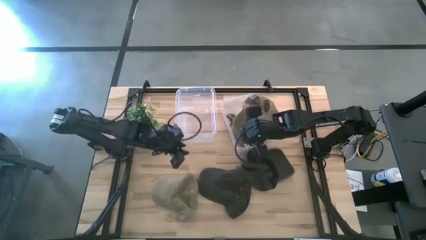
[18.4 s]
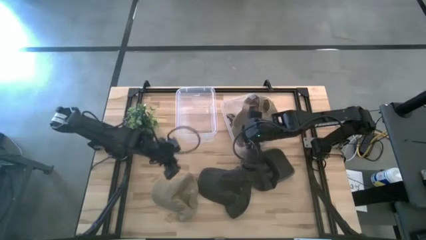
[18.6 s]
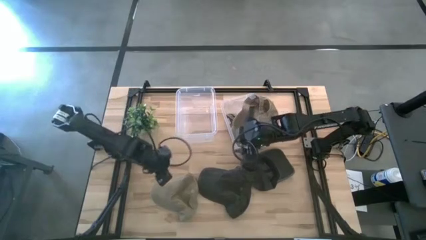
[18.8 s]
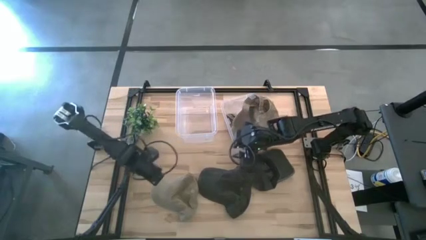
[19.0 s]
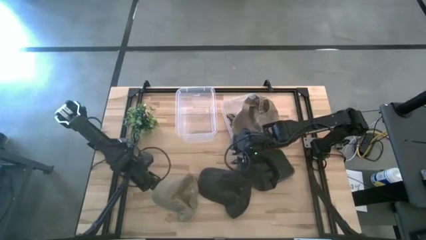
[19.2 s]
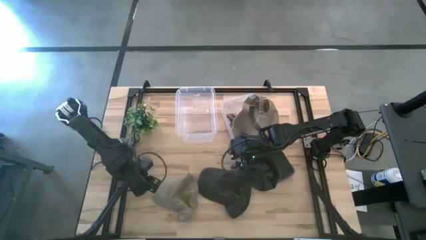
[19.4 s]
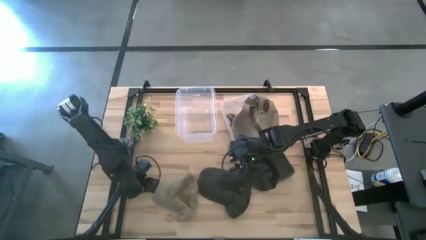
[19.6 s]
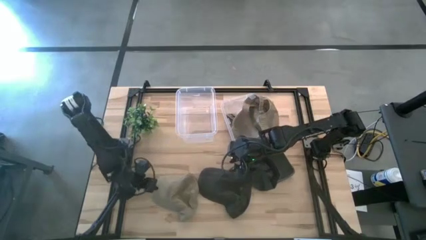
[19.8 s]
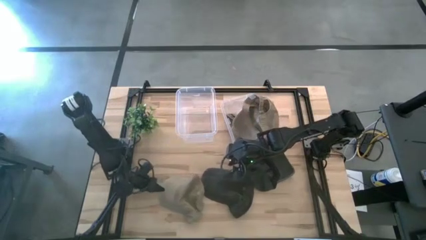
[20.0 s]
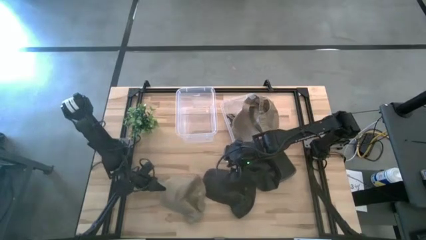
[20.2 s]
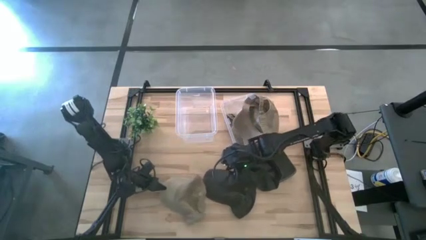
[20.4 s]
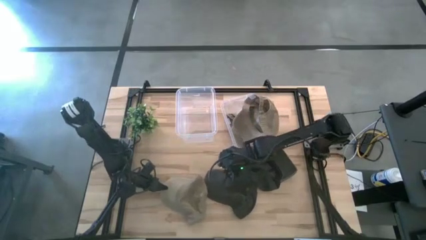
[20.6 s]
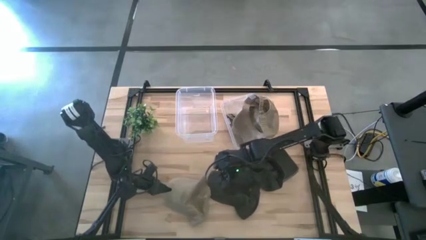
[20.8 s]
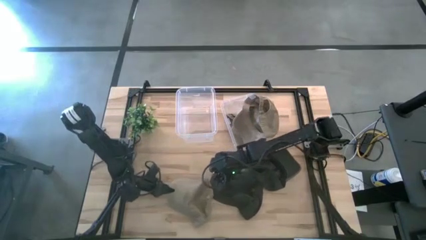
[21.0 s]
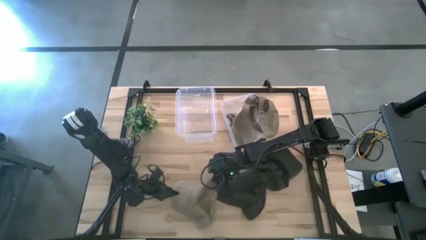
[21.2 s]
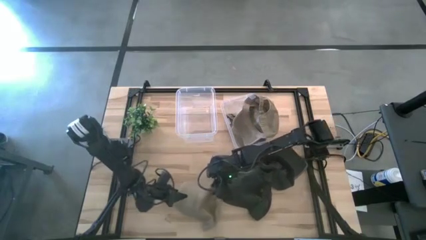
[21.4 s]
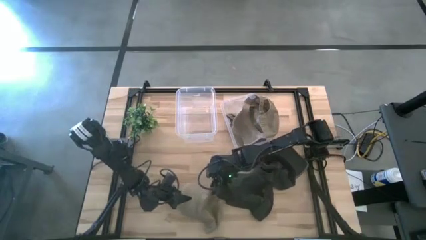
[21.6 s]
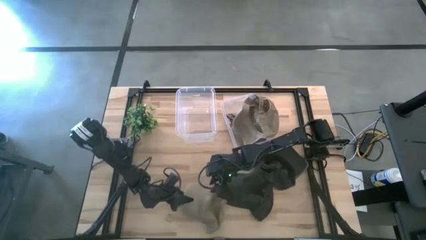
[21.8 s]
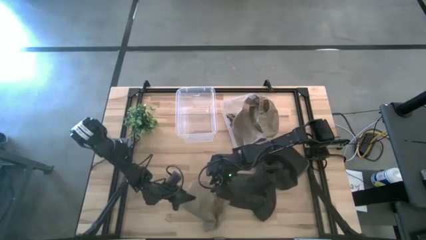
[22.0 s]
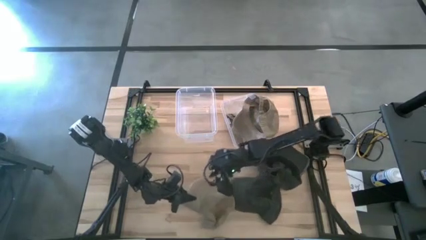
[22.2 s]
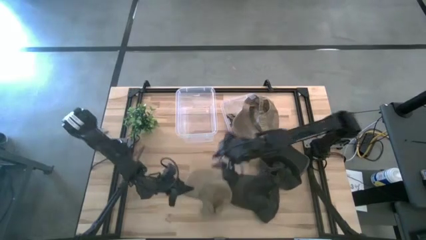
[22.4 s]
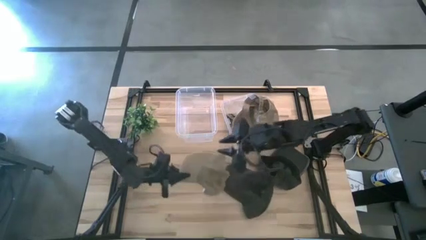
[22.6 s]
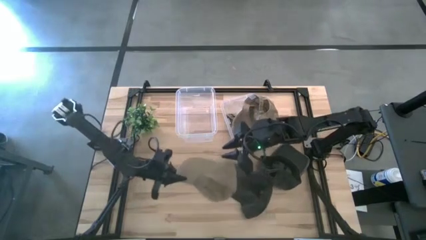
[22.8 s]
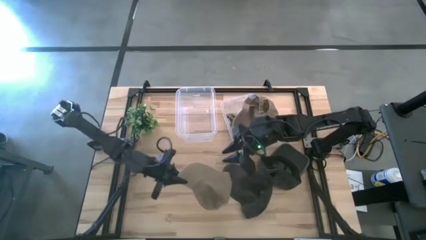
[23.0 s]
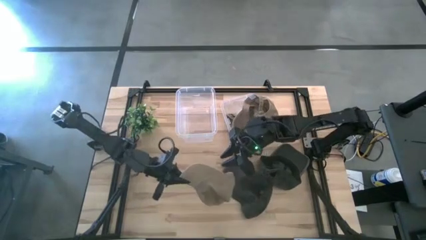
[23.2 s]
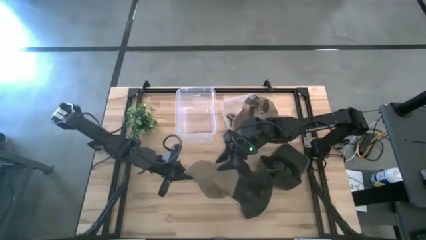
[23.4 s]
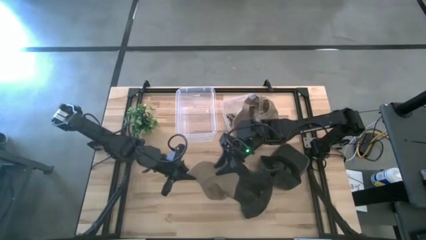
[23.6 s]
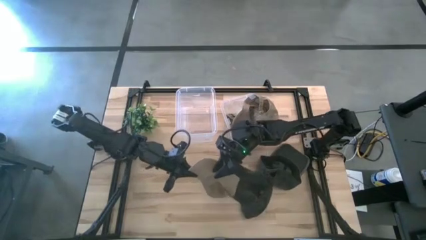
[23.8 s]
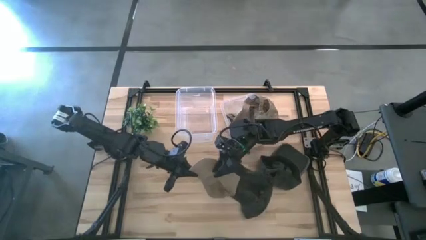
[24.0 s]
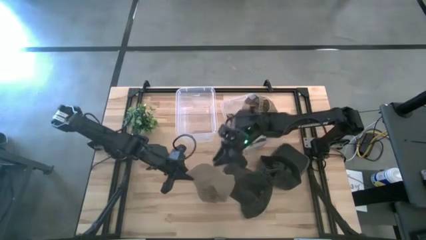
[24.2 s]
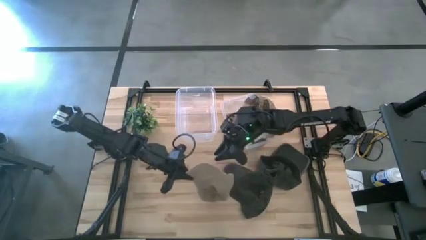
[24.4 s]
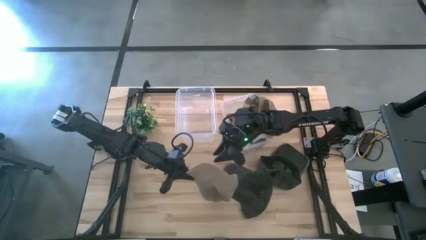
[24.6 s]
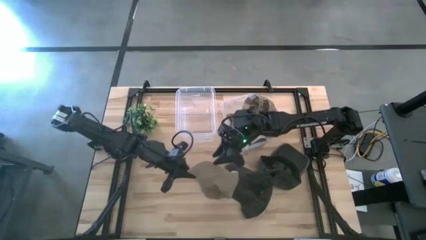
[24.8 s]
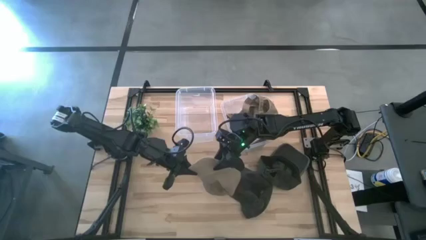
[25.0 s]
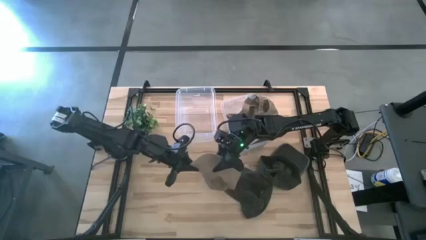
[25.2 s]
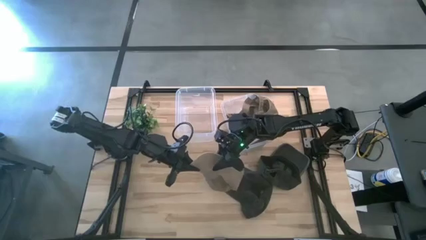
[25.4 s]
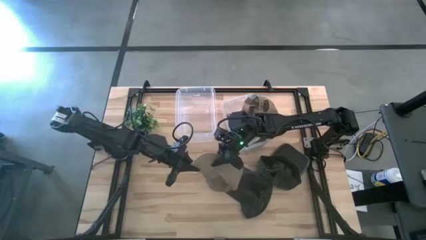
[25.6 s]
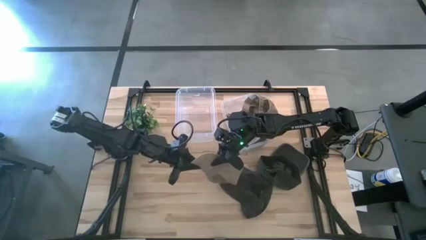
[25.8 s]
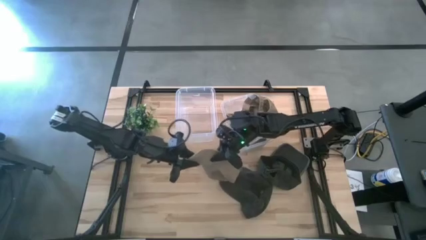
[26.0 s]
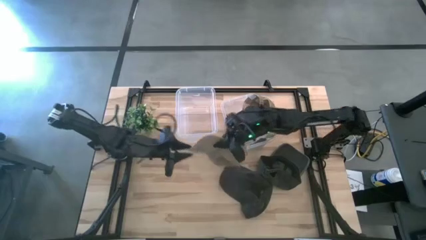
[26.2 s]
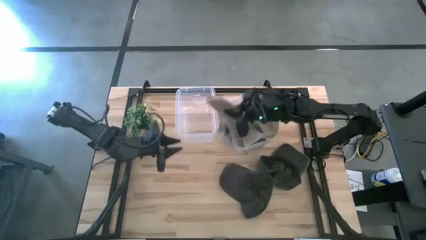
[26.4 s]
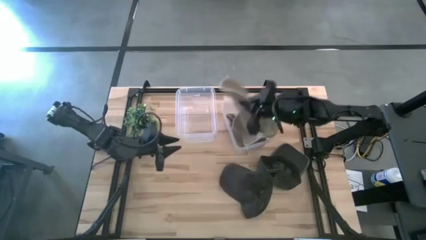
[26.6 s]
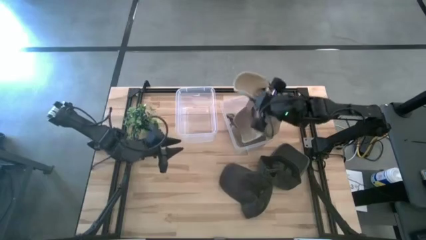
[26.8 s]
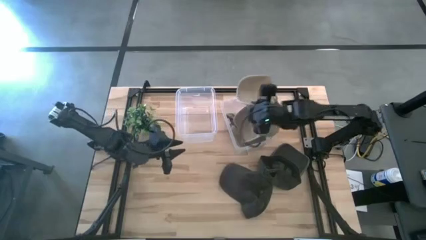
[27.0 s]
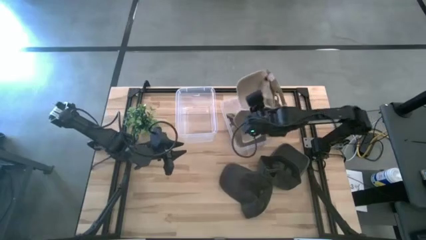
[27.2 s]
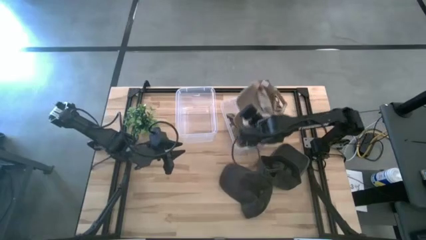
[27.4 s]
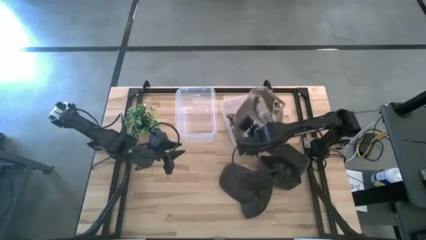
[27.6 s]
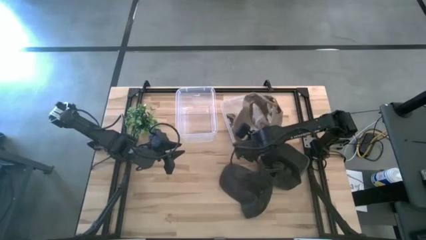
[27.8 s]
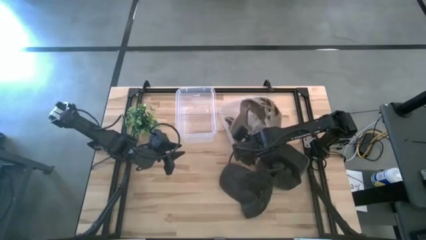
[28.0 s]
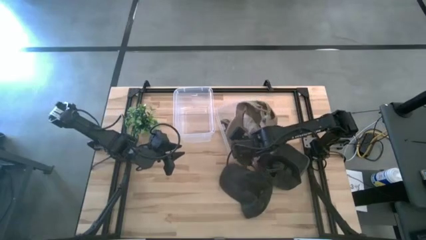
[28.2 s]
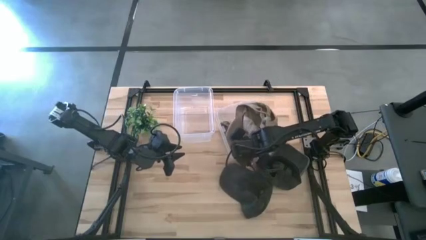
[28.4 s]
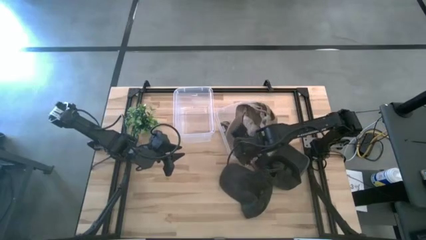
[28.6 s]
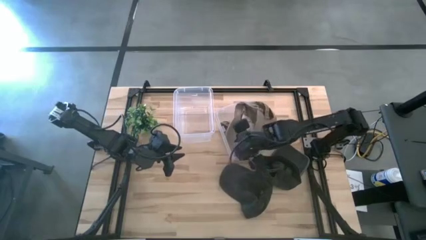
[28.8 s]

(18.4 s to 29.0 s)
Task: Pick & Place hat
Put the brown cap into the right transparent bin

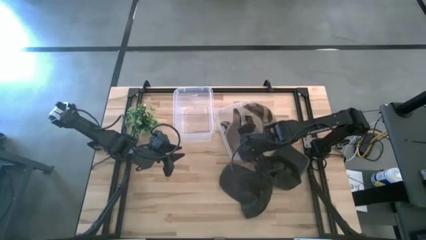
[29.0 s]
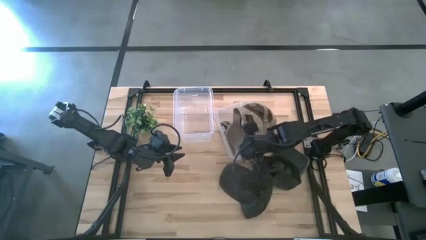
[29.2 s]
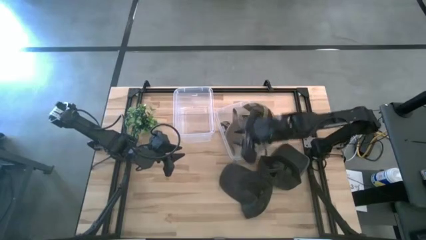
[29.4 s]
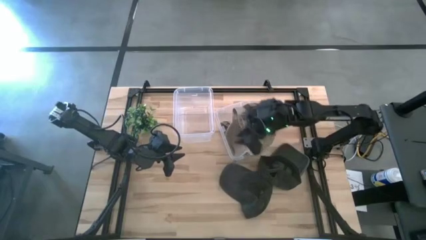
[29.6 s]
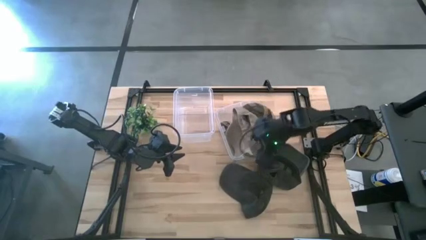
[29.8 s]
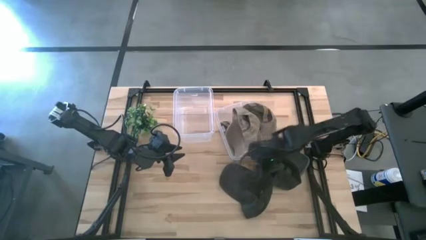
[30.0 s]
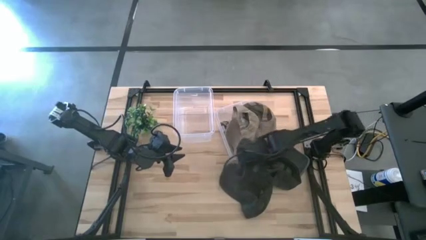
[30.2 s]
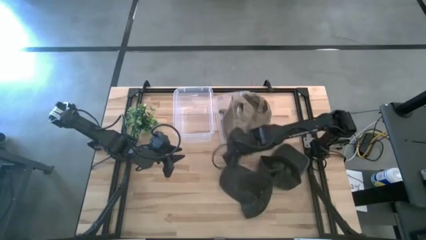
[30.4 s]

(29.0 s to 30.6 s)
Adjust the right transparent bin

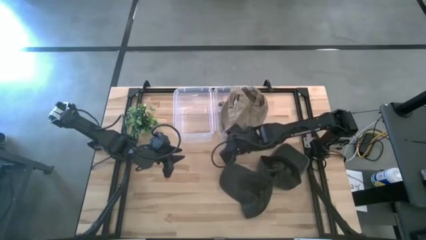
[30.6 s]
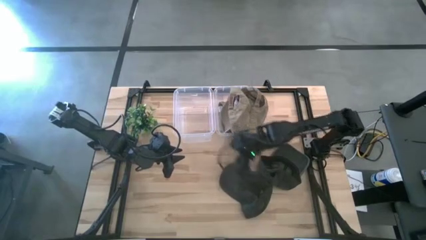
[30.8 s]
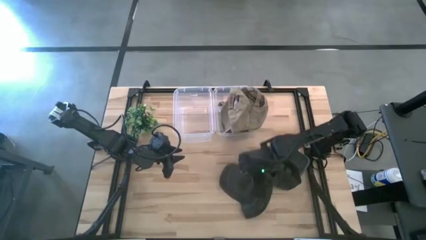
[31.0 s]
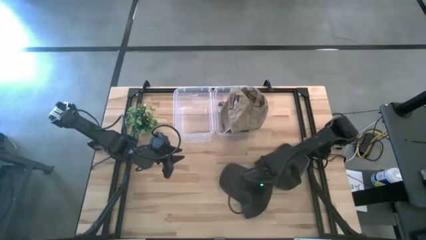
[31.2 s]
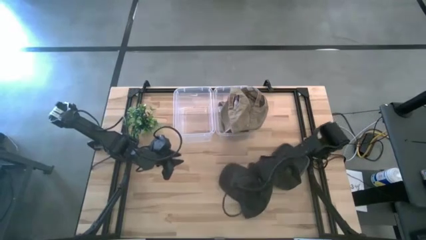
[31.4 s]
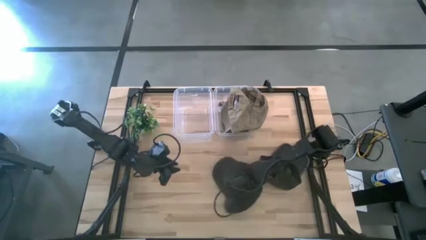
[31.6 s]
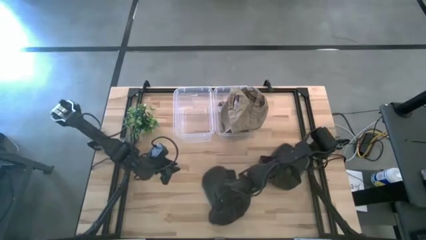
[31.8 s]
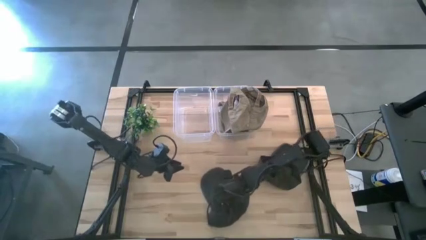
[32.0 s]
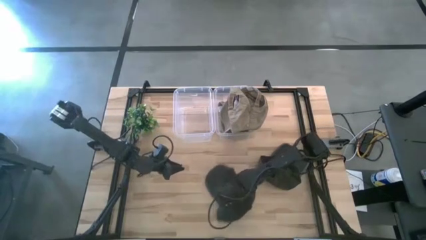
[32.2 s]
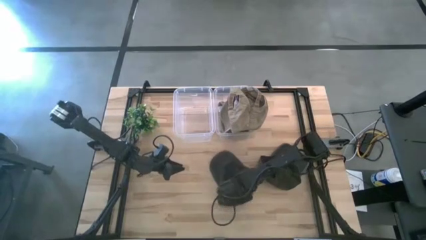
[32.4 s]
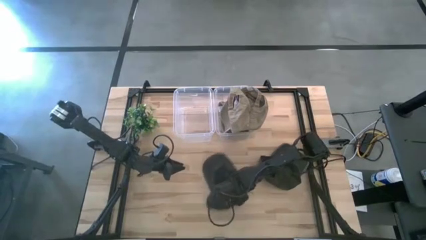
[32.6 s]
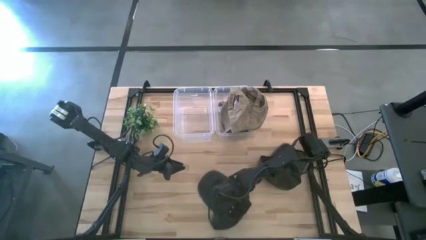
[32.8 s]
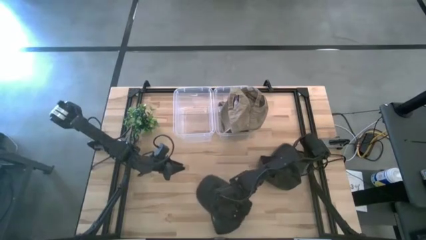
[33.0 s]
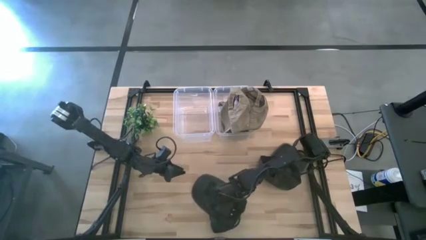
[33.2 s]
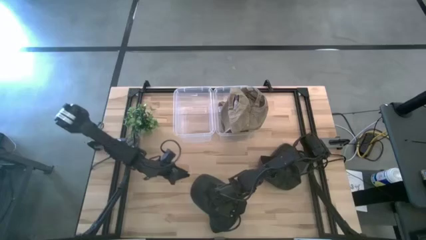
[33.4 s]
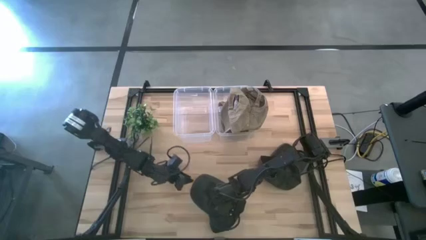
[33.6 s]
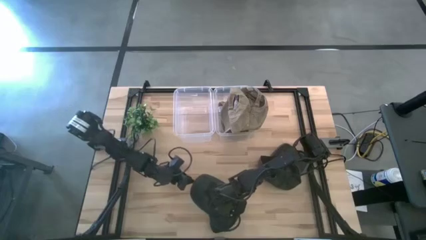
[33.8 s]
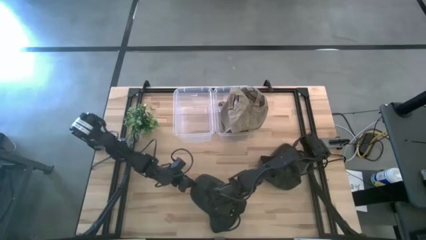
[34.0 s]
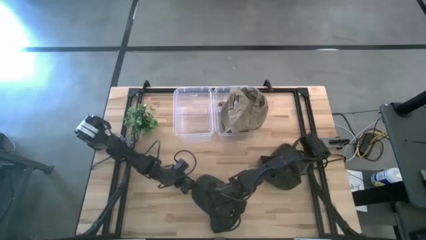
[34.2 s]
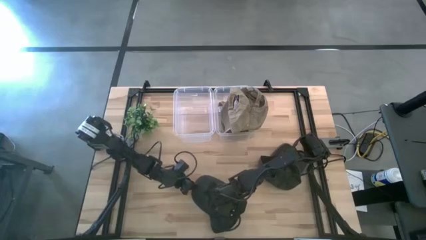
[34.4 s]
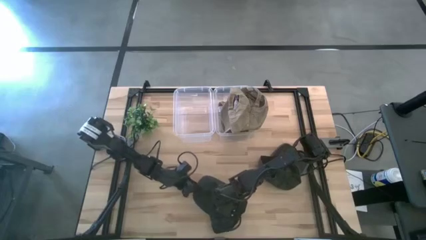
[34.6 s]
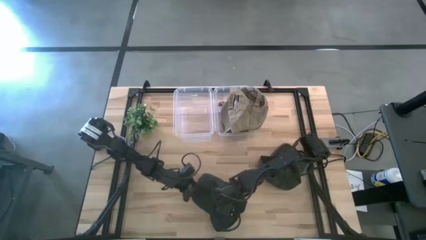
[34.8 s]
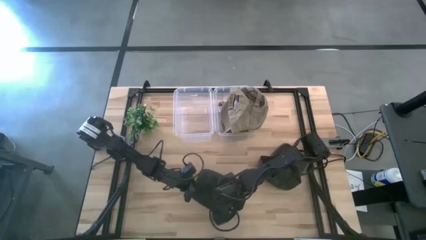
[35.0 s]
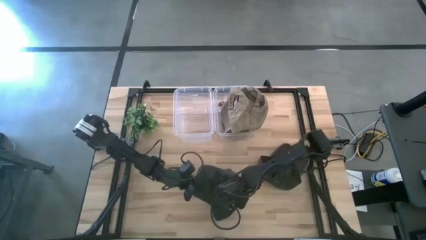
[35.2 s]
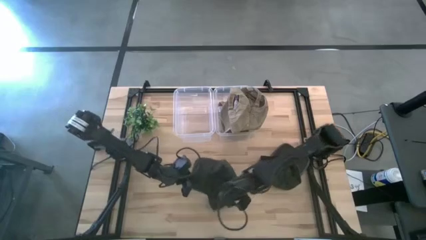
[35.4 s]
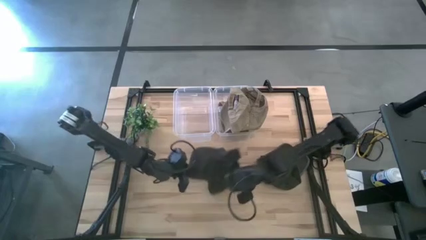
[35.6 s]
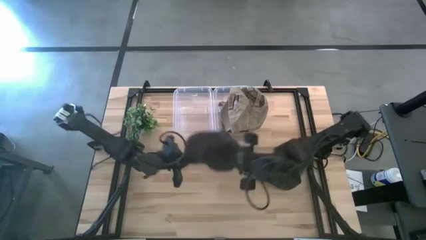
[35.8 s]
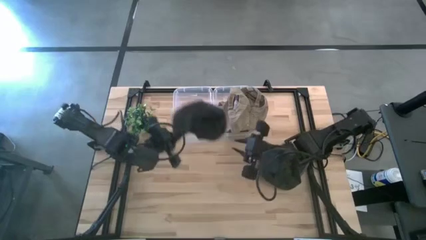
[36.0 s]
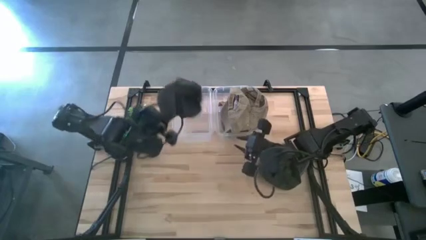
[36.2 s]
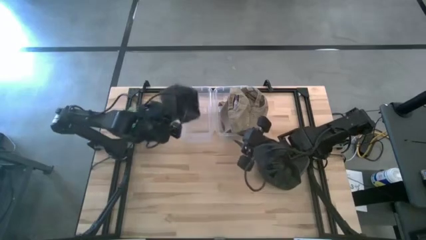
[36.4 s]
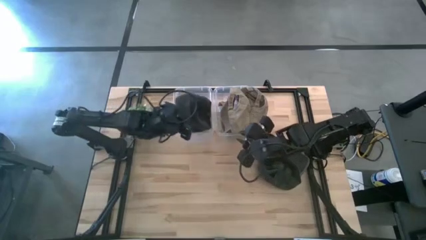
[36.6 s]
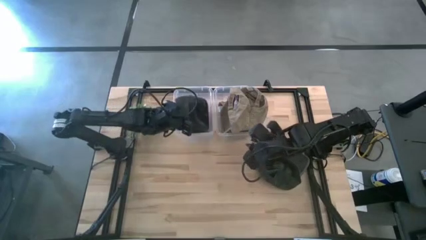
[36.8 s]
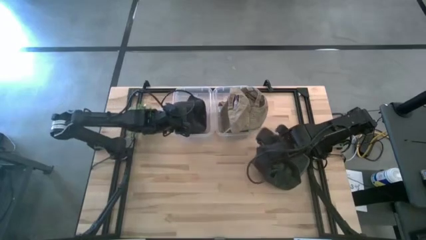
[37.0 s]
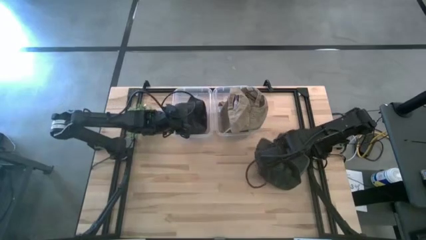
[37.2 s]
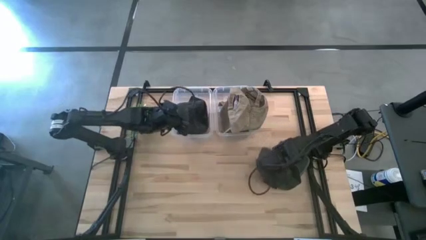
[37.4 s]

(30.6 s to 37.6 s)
Put the left black cap into the left transparent bin
